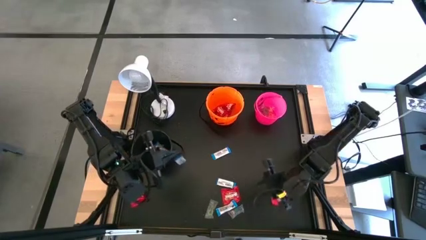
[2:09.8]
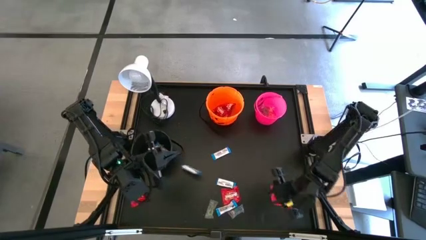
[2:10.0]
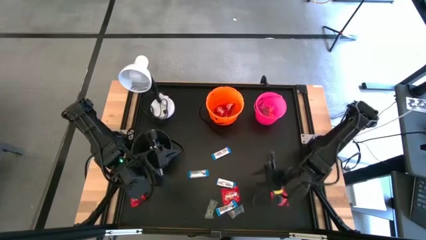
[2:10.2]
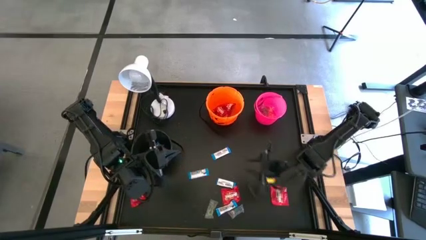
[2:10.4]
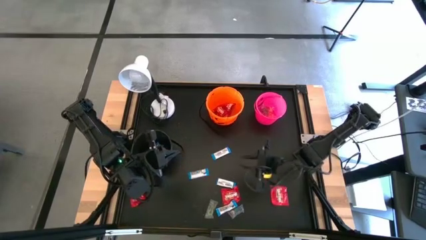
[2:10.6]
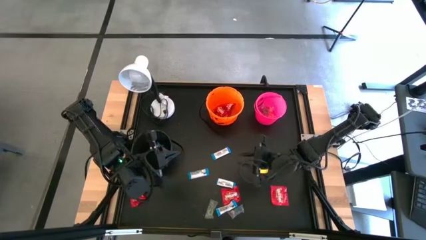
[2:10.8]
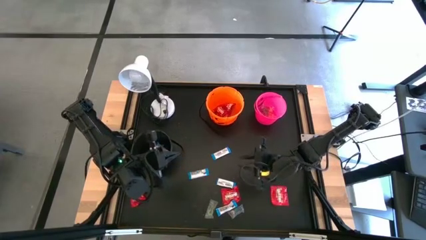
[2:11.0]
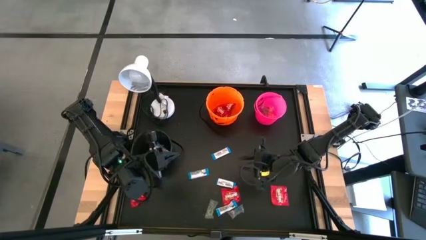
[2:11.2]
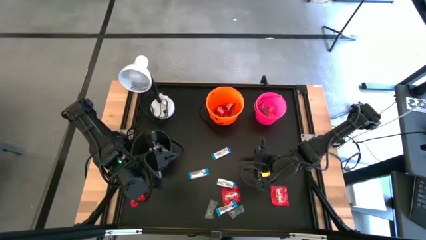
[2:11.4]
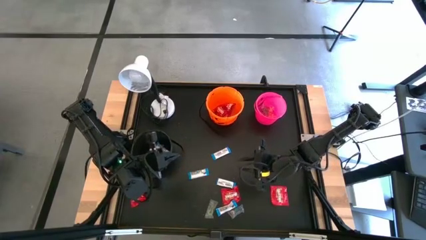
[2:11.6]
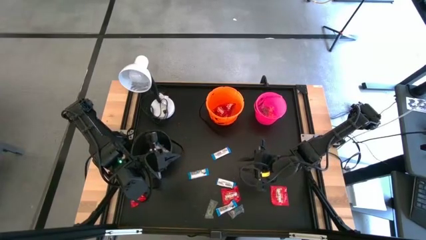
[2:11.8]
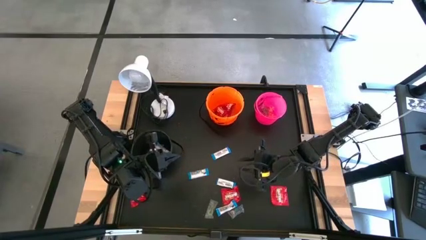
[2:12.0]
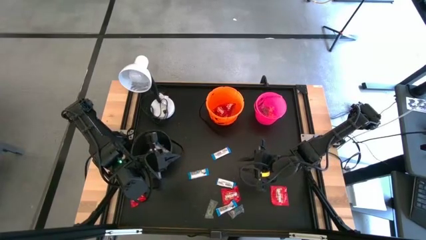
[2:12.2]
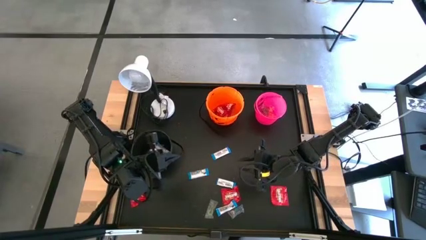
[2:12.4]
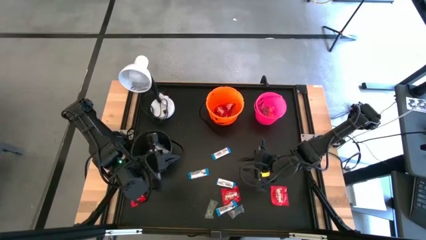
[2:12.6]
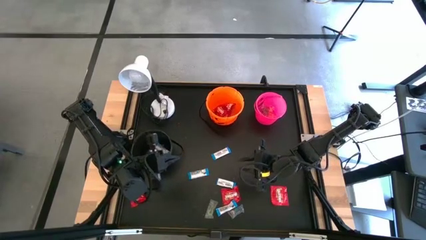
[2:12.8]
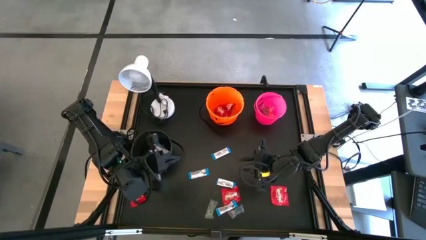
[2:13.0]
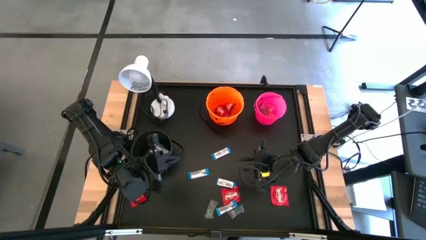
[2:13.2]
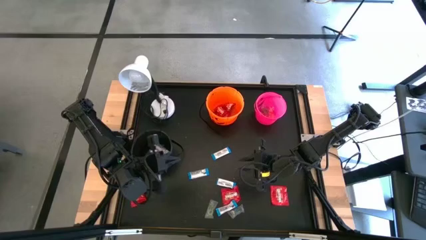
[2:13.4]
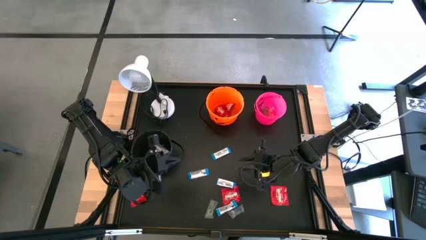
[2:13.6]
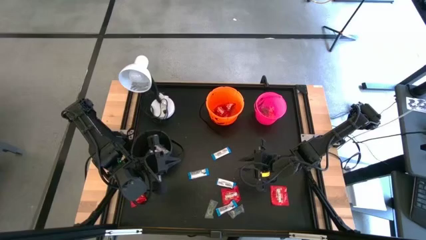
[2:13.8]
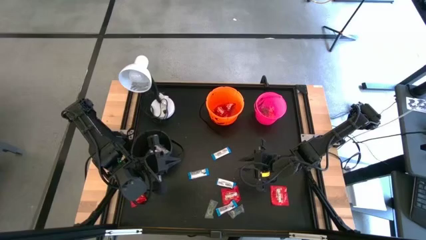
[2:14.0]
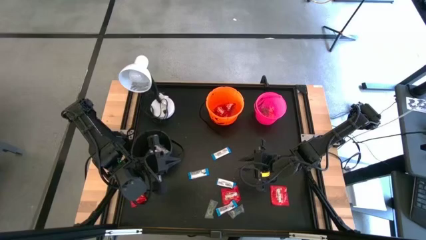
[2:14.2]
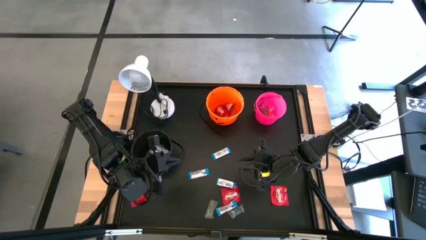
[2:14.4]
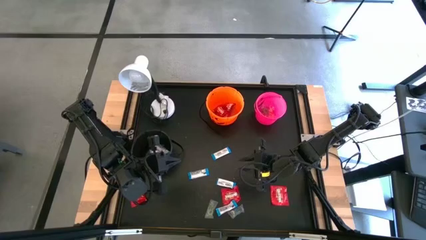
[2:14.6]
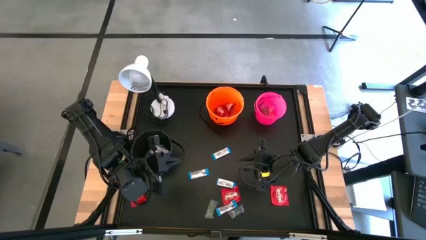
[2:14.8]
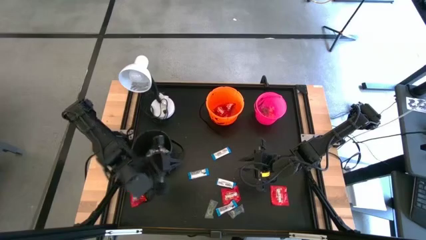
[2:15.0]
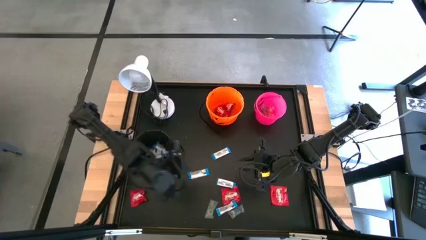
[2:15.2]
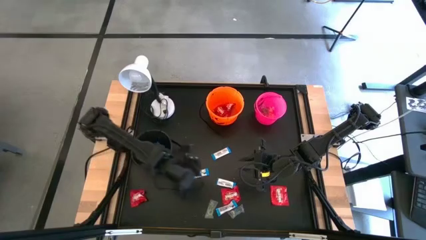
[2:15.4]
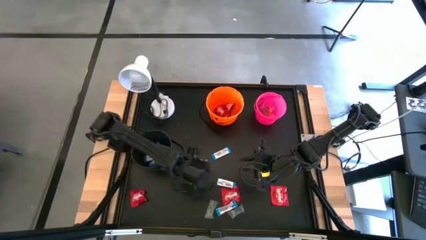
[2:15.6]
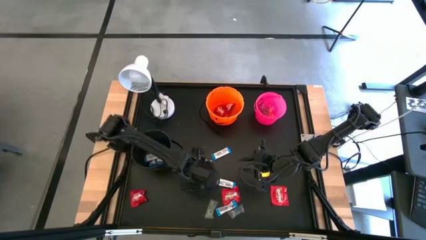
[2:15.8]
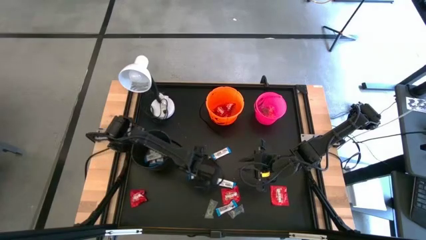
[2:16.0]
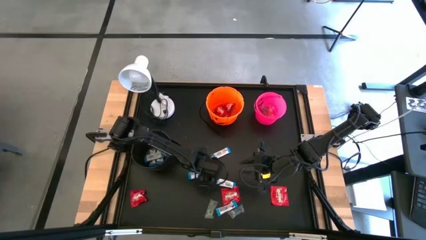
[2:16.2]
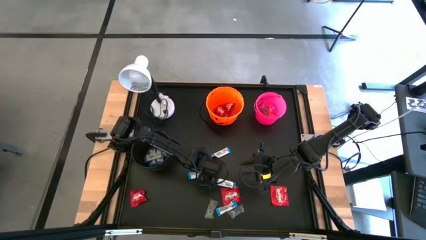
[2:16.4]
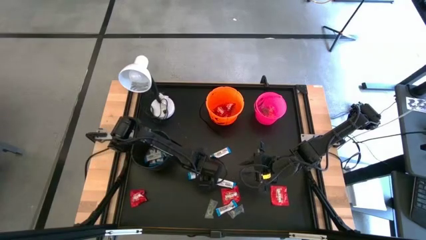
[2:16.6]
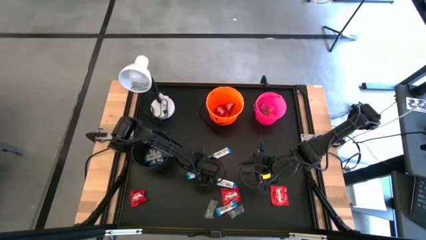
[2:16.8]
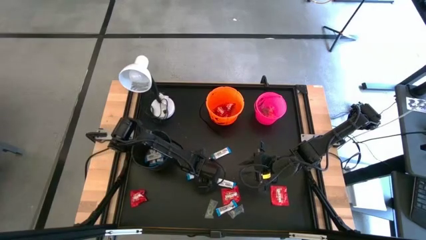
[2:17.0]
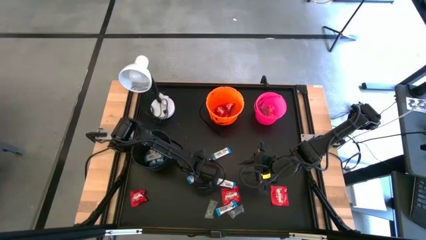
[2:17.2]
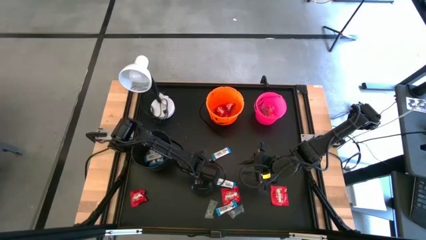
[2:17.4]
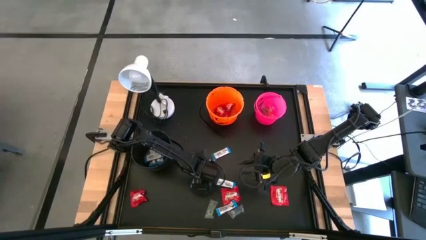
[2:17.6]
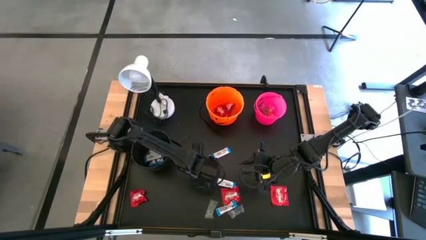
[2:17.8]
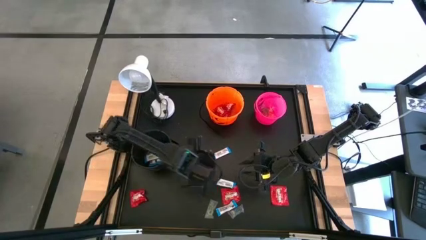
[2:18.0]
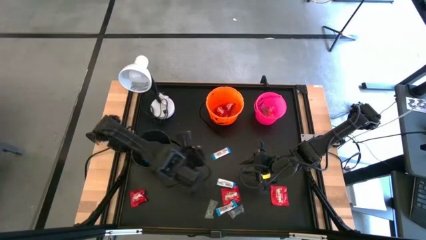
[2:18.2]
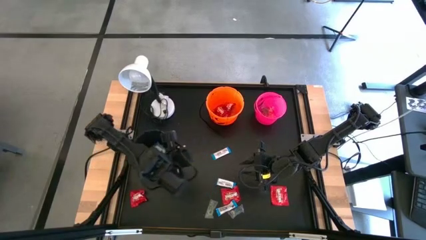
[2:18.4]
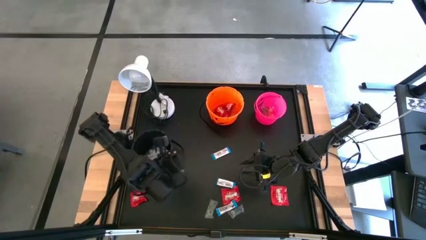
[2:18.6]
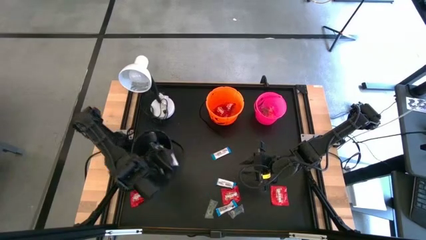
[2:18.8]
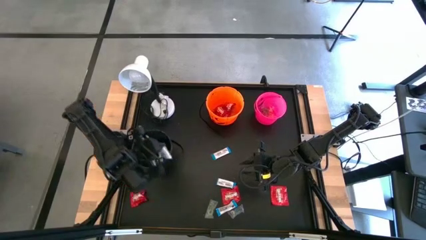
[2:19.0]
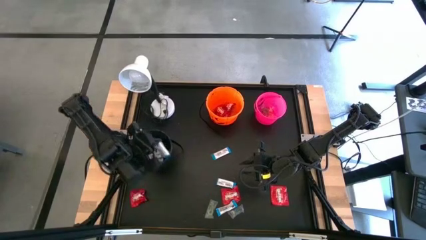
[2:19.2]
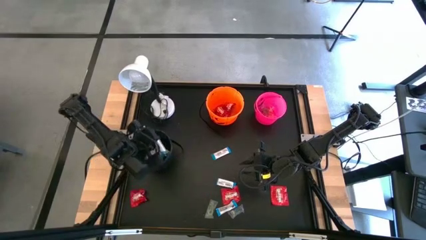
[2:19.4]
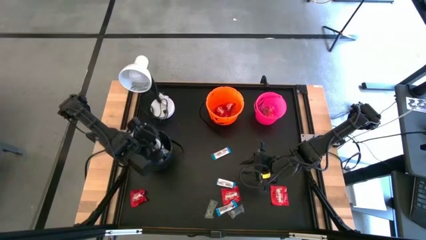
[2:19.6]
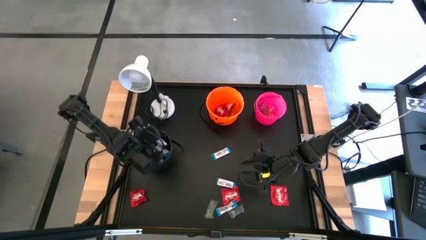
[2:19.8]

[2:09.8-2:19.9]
Task: Sort candy
Put the white candy into the black bucket

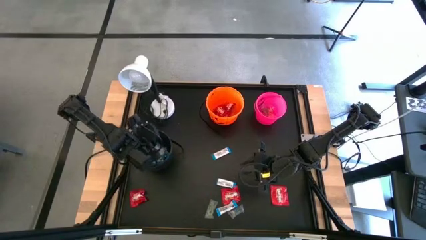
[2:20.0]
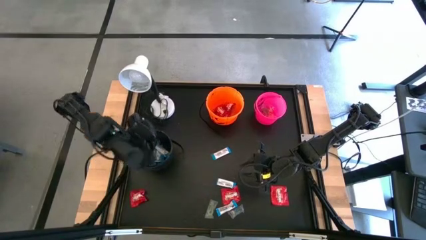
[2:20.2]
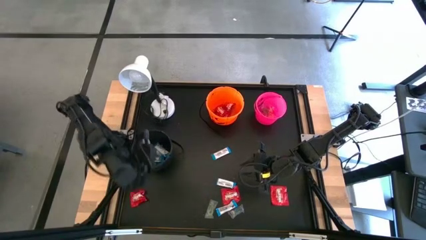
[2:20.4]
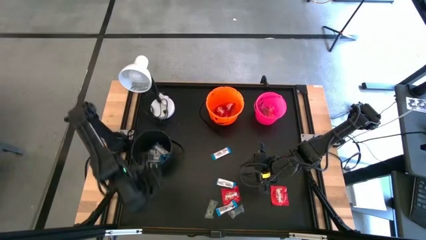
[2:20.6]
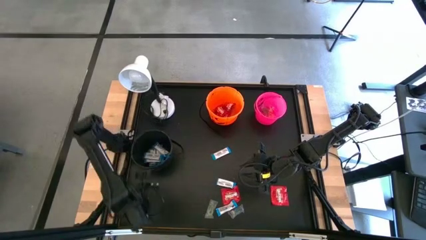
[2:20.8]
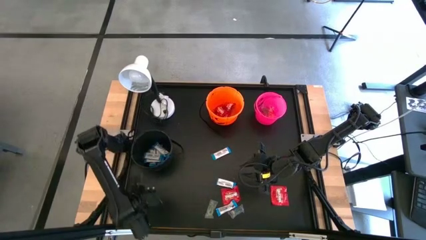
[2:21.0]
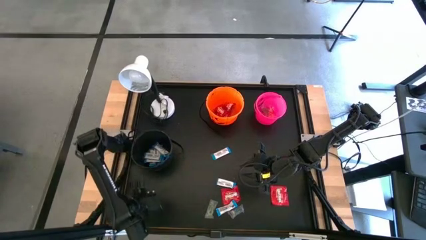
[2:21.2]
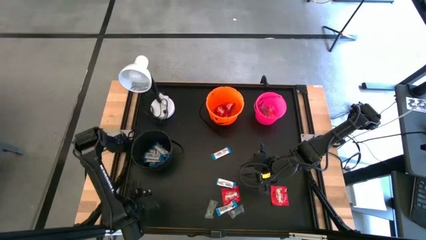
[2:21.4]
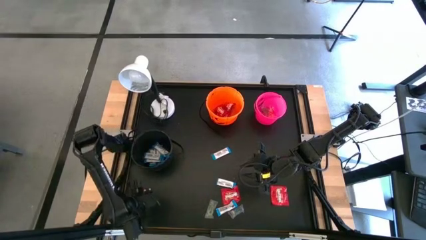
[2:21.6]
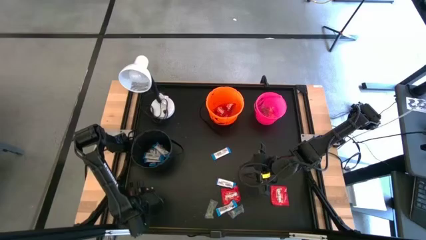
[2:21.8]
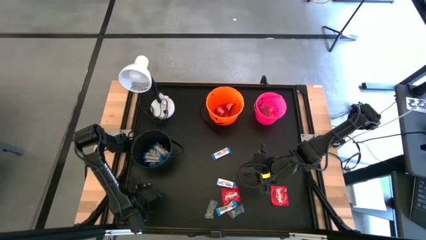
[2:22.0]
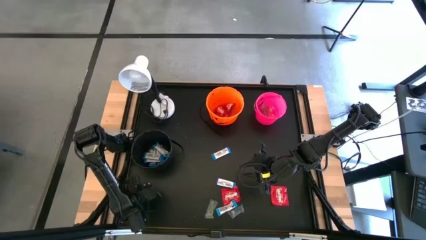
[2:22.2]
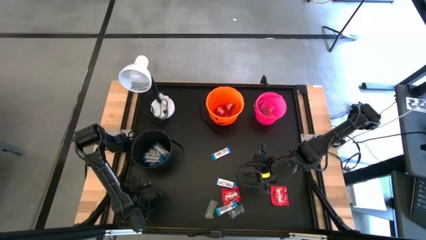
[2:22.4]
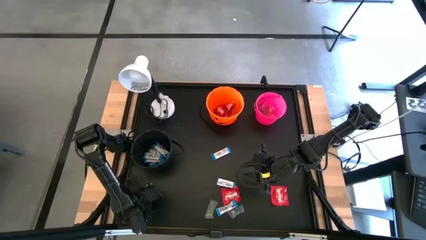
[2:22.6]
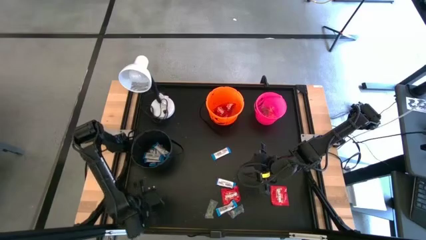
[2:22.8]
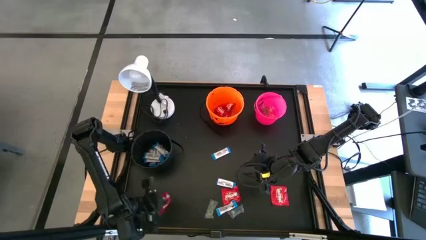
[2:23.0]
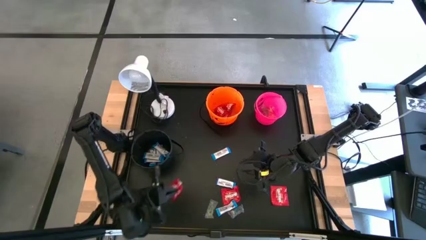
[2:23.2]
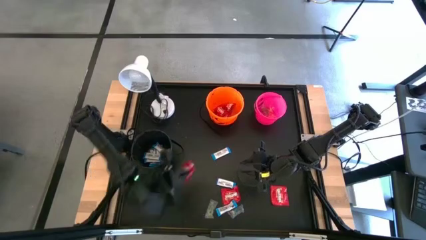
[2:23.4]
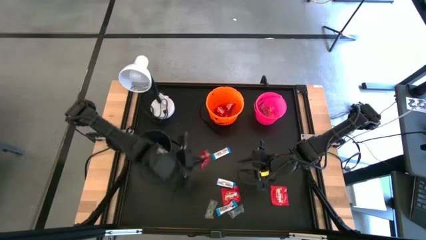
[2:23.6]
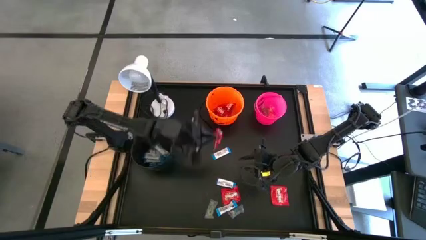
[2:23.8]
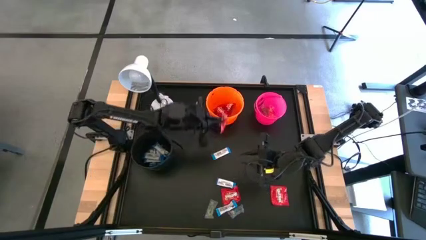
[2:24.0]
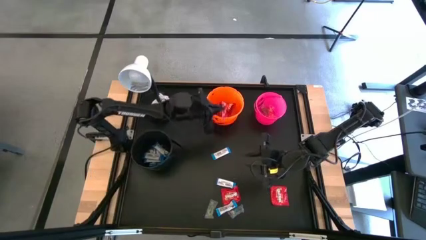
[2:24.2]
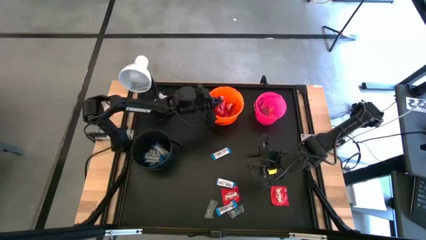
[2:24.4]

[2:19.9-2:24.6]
Put the red candy into the orange bucket

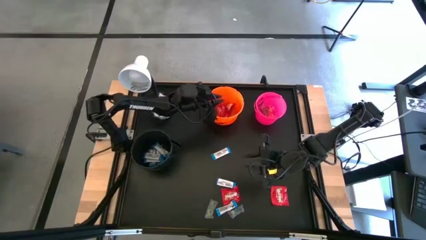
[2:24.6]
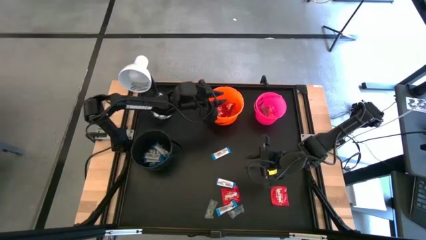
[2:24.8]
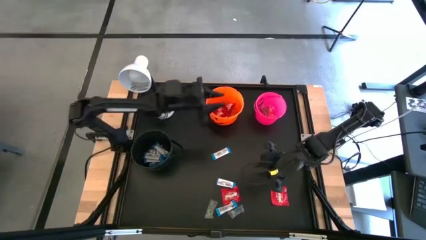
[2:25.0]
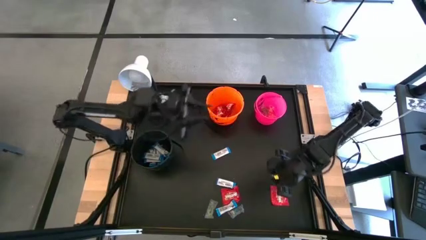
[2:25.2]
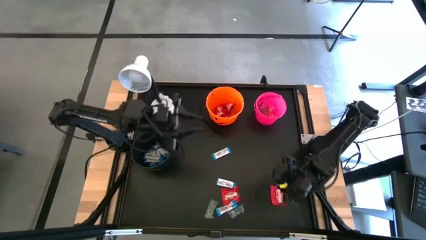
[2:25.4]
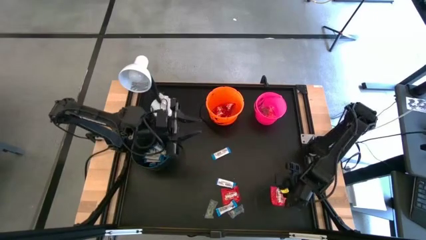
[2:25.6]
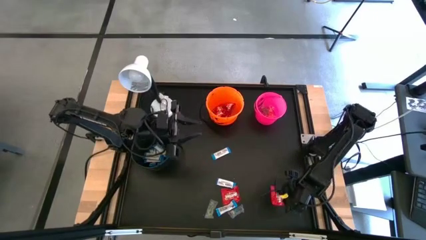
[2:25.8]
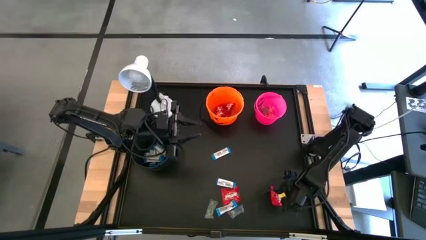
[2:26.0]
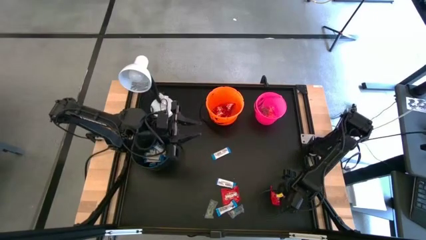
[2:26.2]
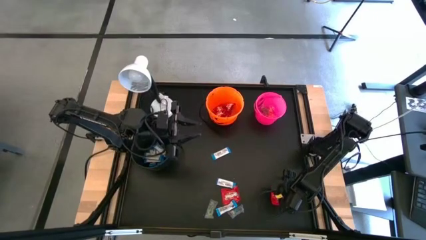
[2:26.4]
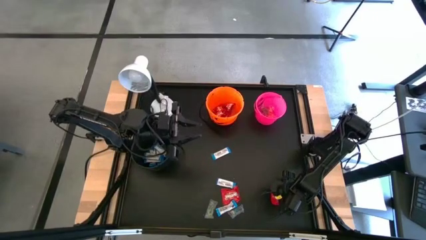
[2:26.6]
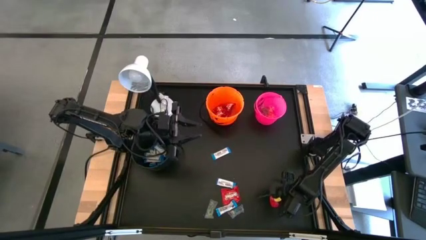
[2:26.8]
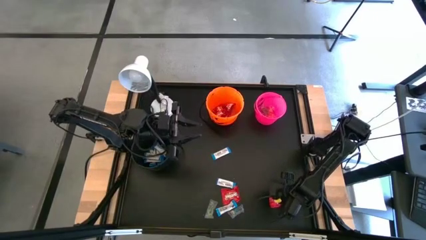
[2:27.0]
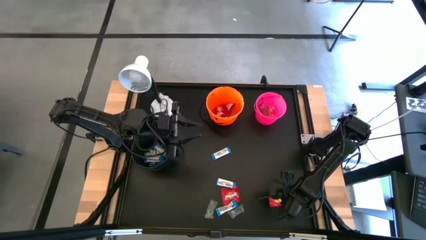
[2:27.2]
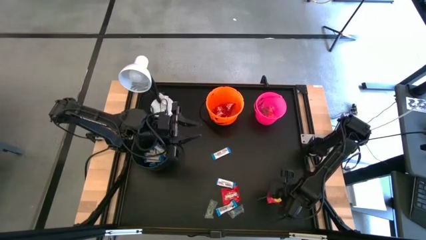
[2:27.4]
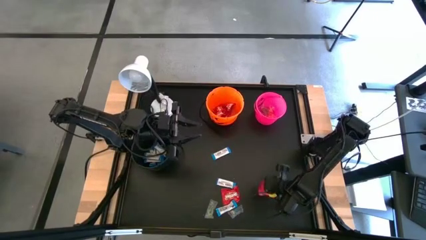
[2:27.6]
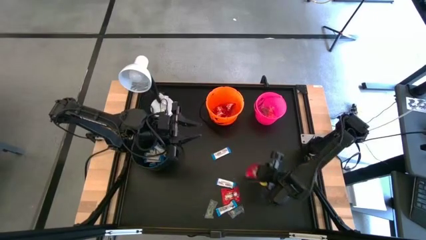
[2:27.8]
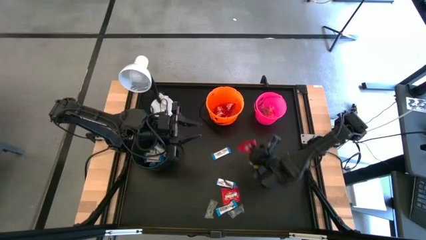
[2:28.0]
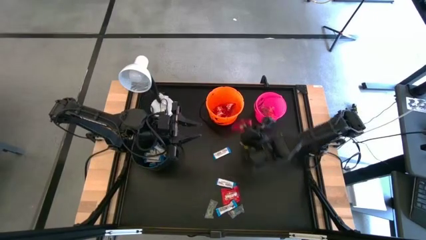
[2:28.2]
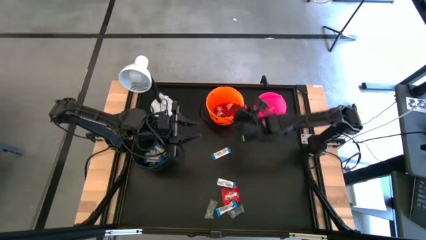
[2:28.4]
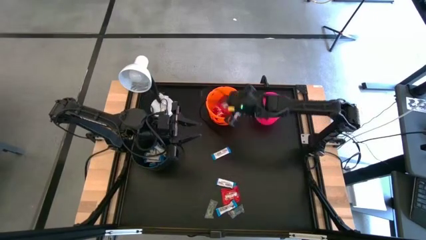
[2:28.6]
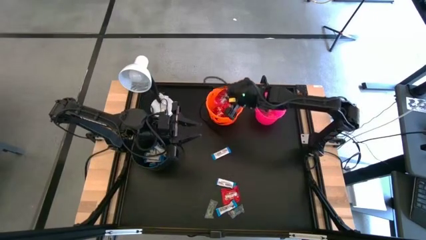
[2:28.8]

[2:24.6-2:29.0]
Put the red candy into the orange bucket
